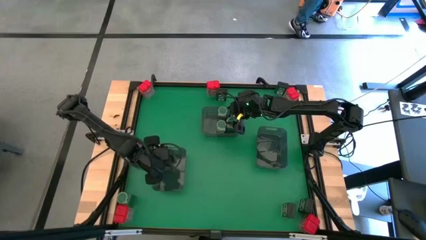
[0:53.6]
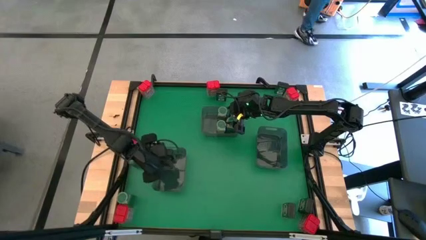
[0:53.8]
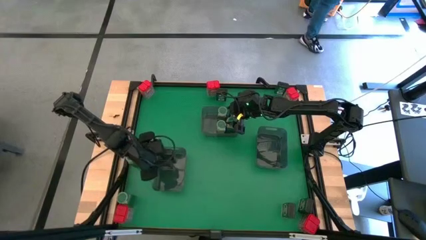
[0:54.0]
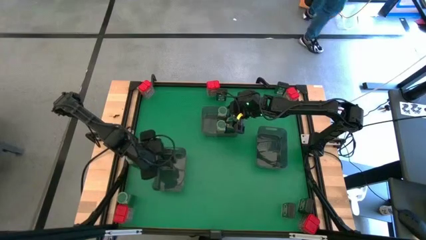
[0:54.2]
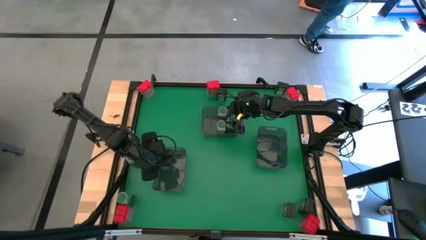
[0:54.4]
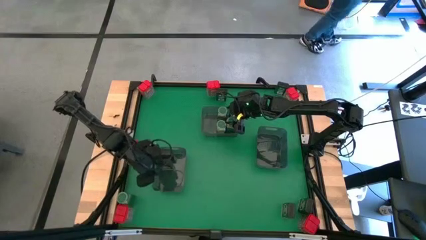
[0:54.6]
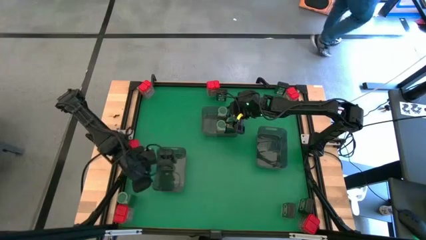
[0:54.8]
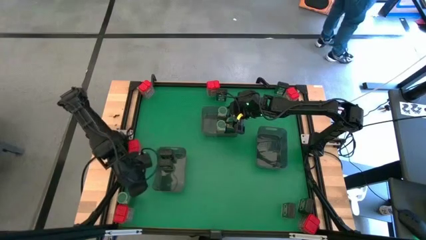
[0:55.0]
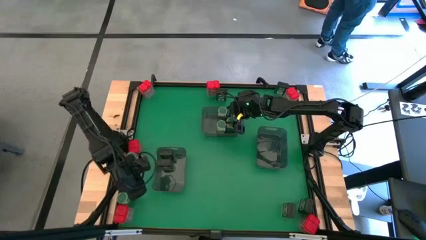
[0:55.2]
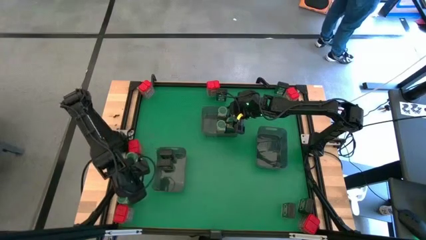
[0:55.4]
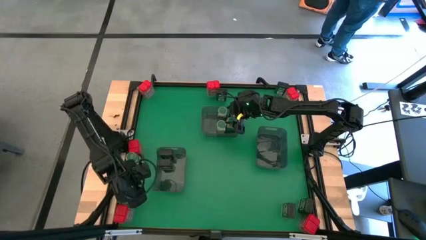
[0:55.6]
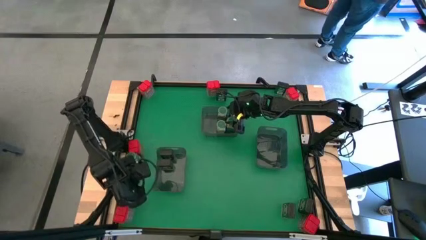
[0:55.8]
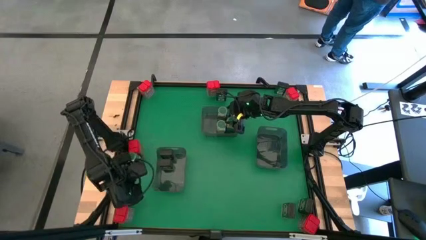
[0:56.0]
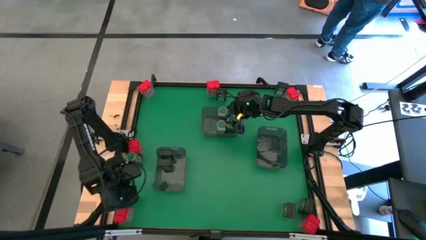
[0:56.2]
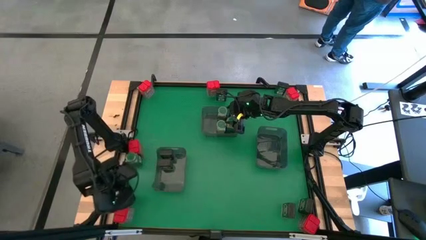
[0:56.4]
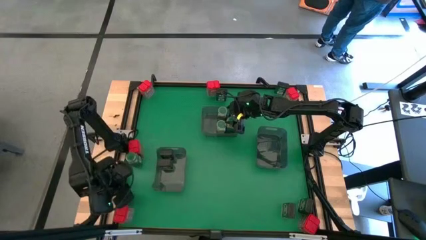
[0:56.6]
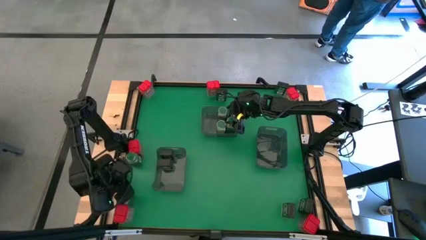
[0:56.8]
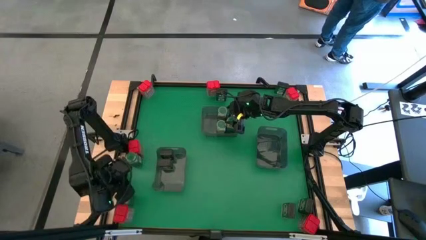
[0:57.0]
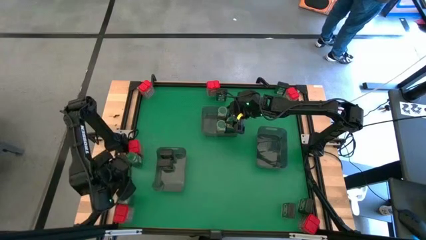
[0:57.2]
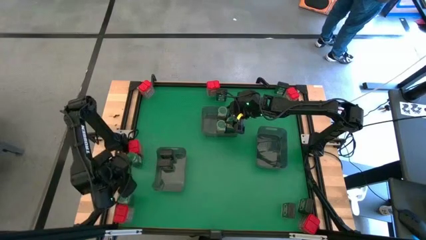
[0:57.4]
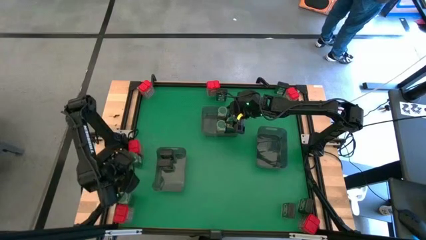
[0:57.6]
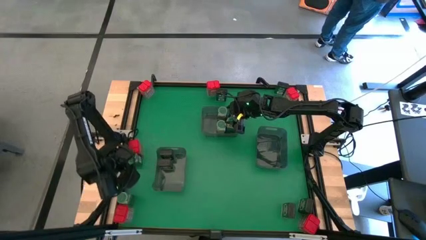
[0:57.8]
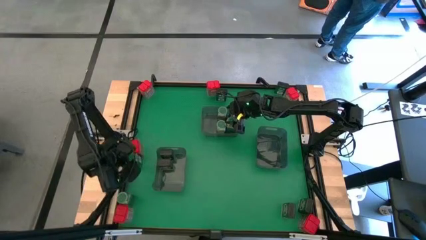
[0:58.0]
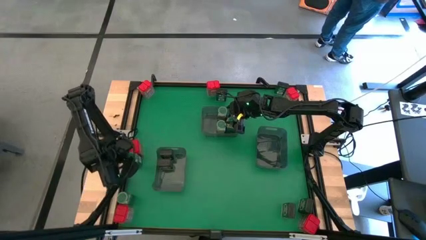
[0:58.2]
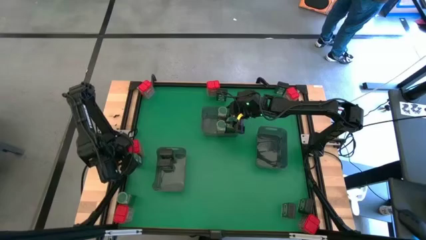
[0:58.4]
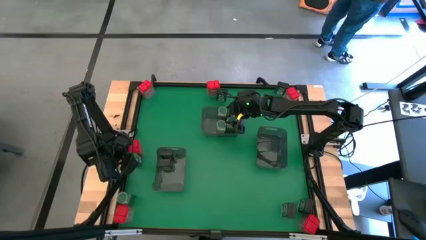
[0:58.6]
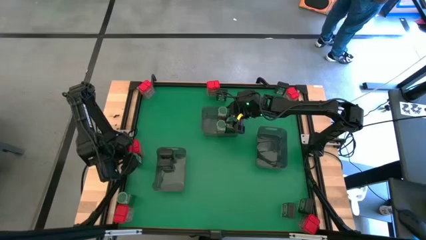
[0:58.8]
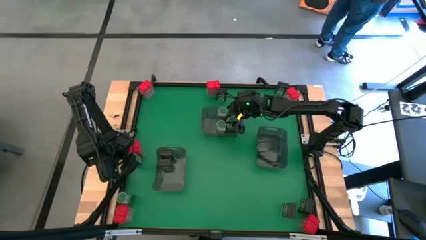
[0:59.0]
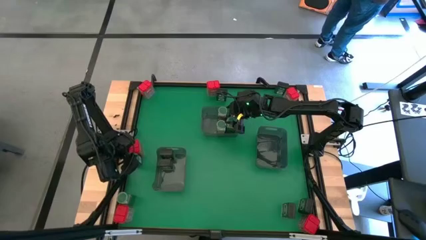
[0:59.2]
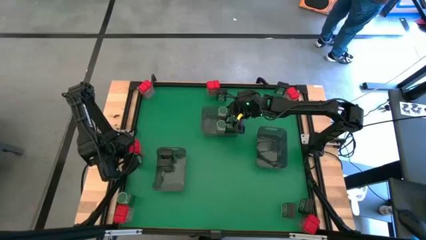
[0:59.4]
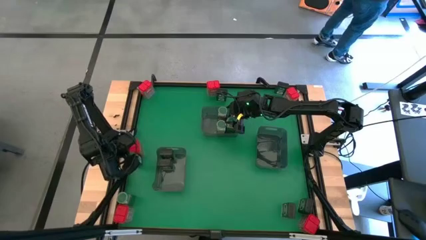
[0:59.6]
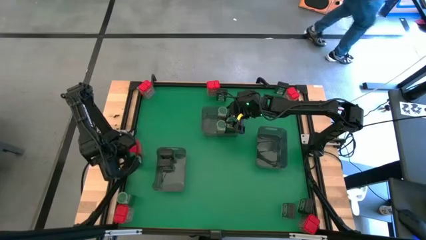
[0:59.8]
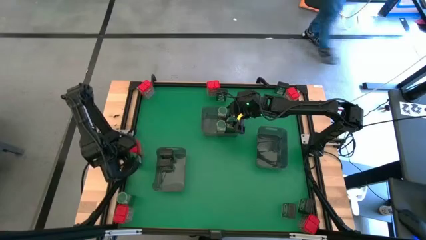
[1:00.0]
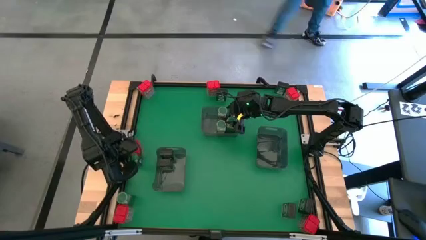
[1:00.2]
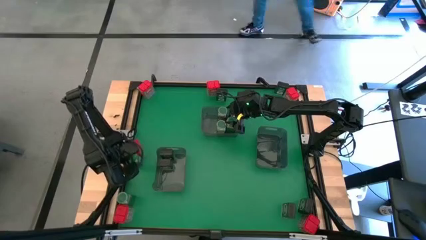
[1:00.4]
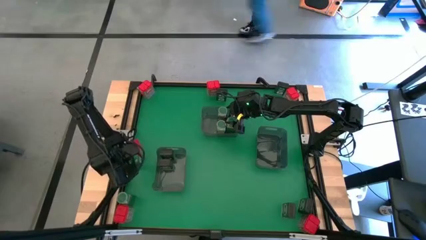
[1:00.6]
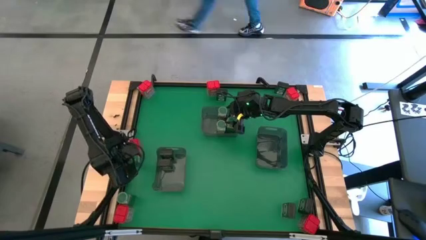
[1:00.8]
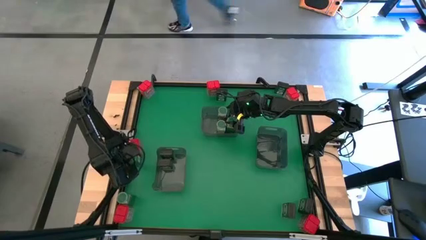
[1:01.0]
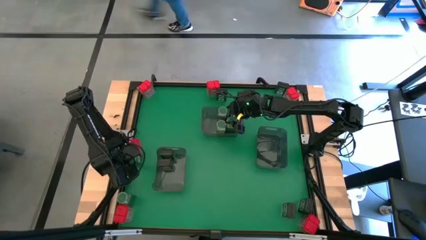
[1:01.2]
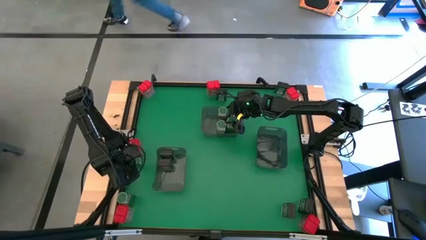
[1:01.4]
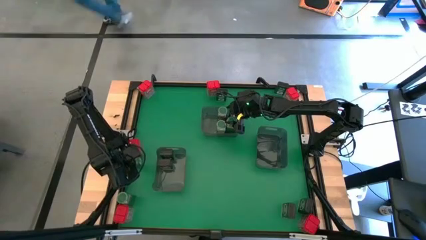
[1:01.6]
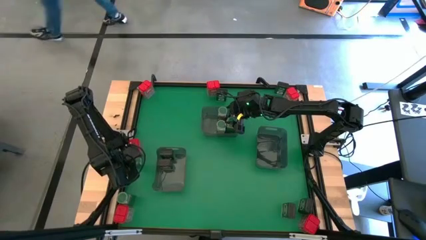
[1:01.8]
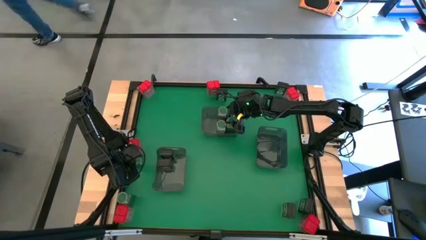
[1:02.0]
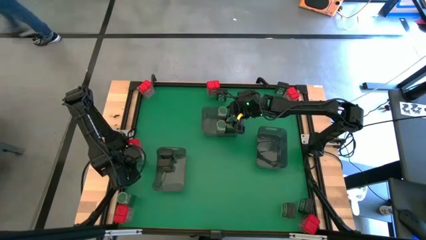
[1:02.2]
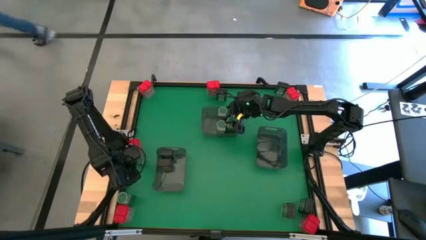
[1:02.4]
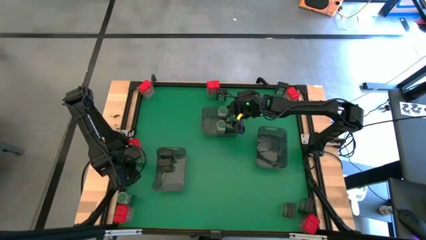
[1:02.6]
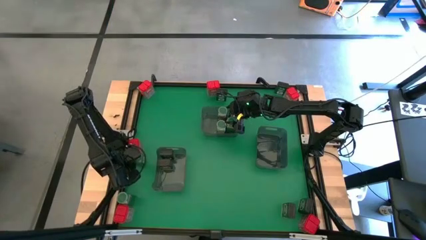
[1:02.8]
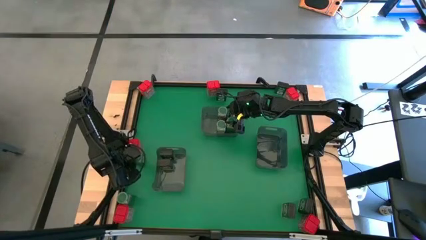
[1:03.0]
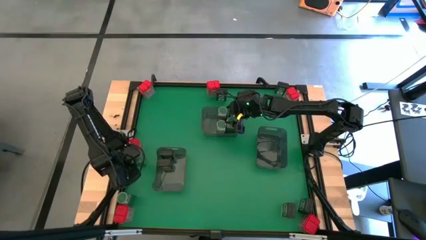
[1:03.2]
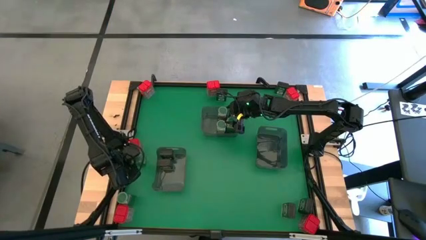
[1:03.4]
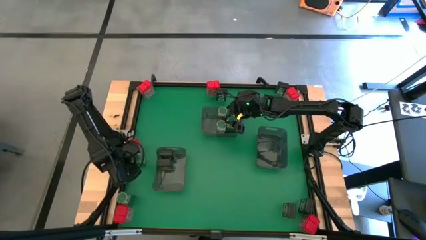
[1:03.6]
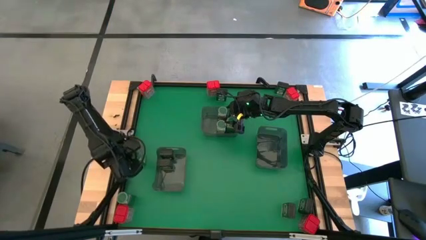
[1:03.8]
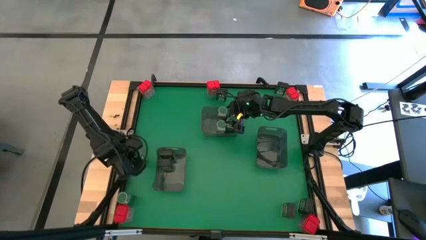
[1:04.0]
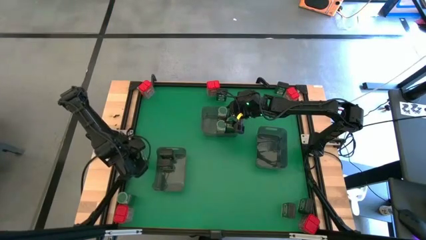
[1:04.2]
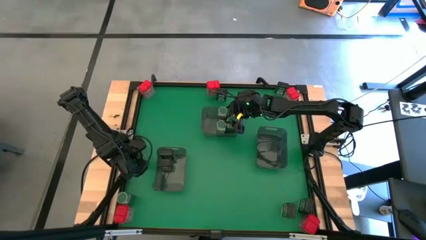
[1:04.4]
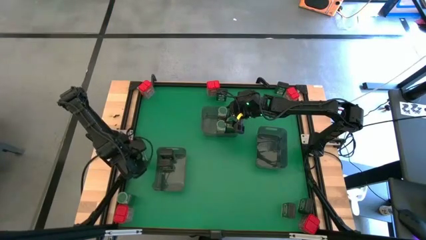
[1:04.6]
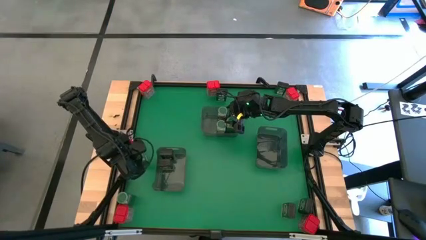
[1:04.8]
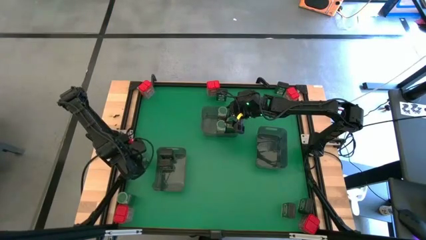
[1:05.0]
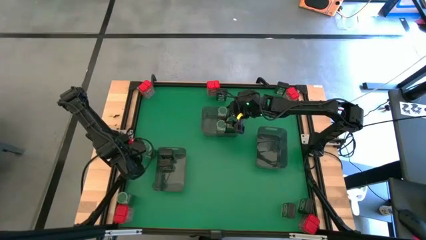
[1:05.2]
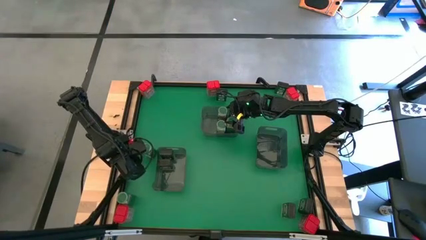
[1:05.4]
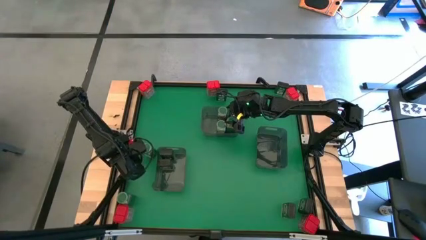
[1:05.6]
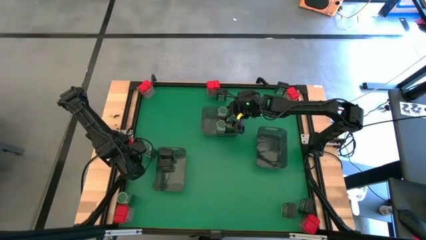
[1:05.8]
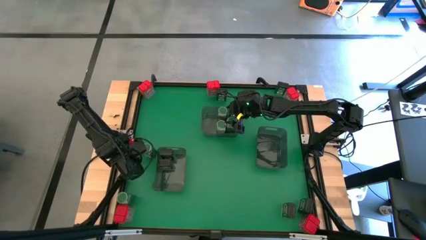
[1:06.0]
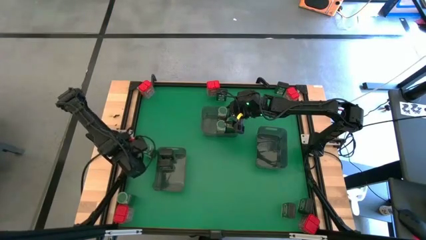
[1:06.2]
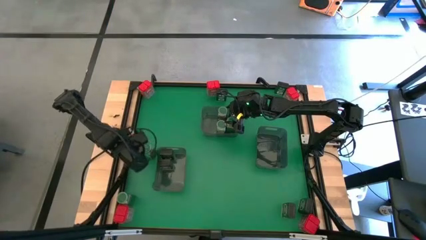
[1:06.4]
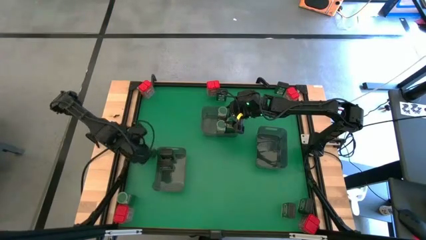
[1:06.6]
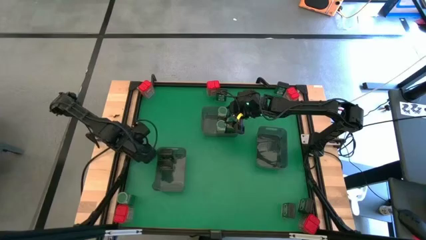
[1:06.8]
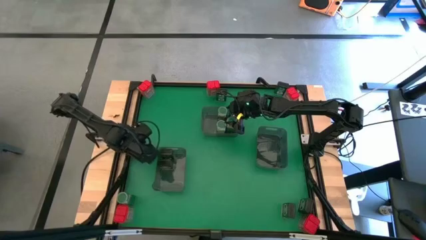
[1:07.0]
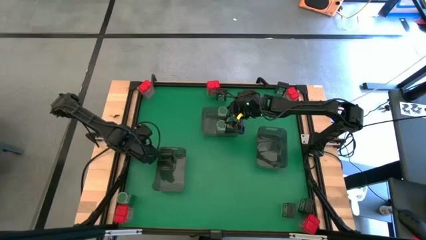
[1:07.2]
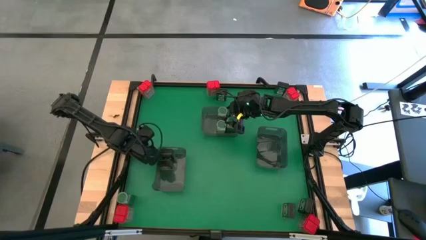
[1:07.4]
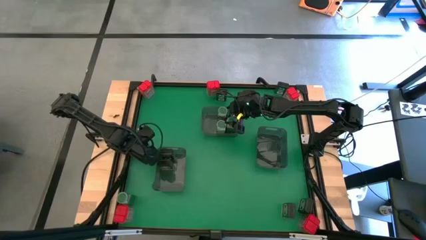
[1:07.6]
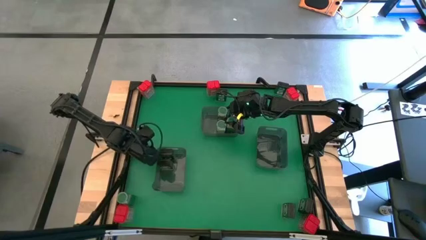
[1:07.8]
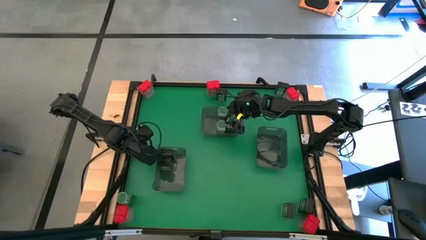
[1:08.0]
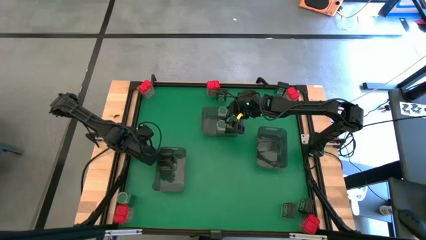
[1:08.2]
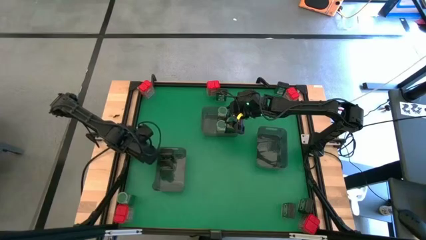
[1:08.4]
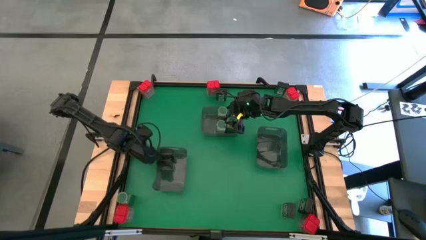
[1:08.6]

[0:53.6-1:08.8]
Task: Sort spices by type
Put the green seasoning bottle into the top black bin

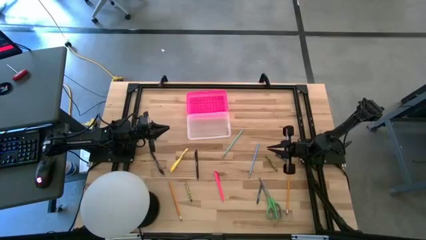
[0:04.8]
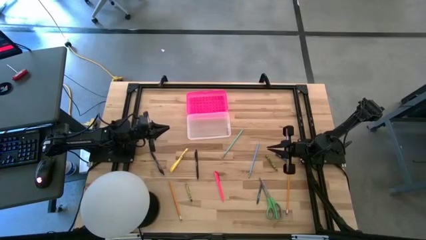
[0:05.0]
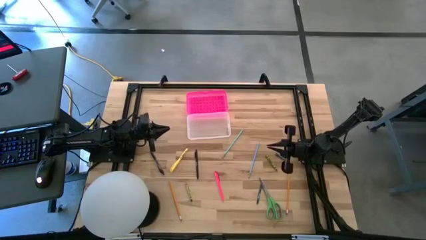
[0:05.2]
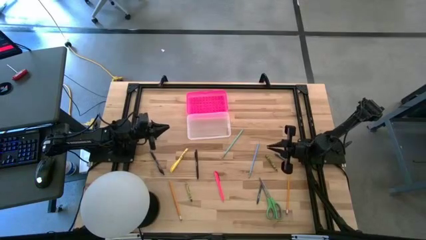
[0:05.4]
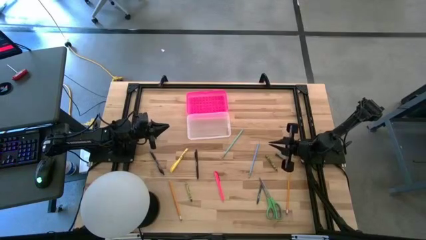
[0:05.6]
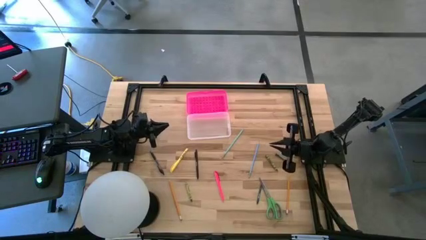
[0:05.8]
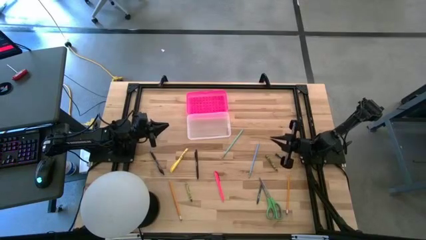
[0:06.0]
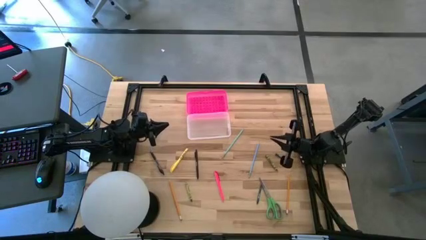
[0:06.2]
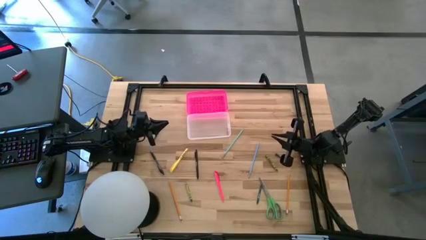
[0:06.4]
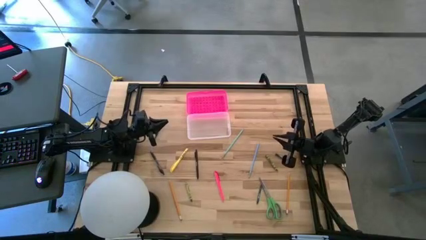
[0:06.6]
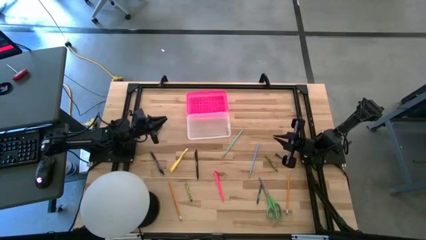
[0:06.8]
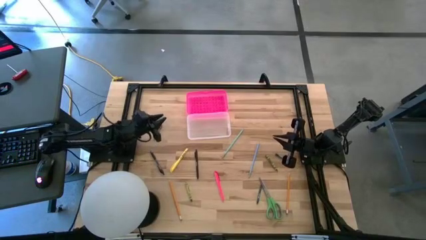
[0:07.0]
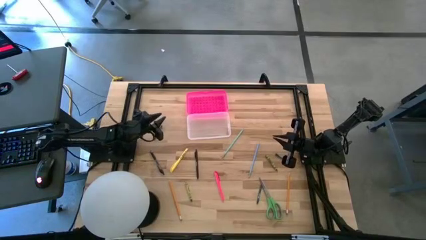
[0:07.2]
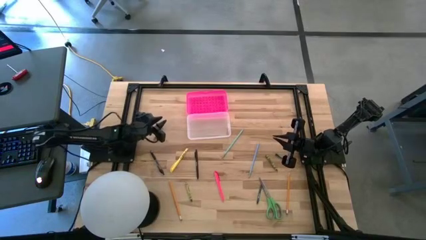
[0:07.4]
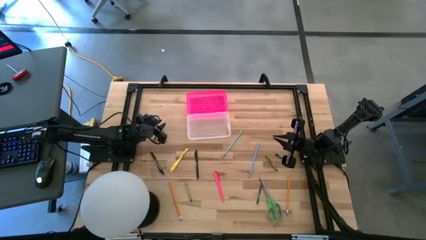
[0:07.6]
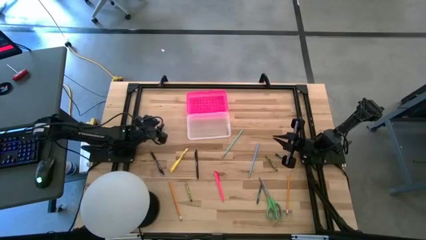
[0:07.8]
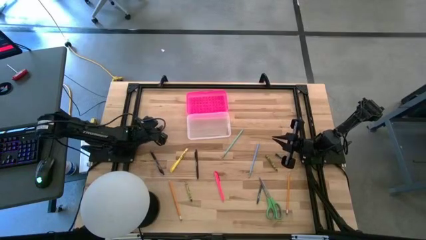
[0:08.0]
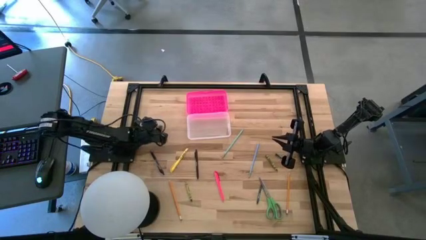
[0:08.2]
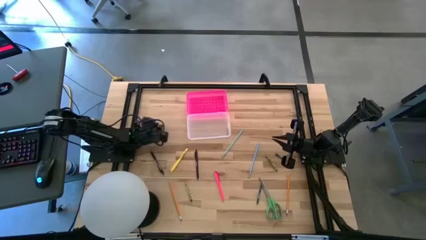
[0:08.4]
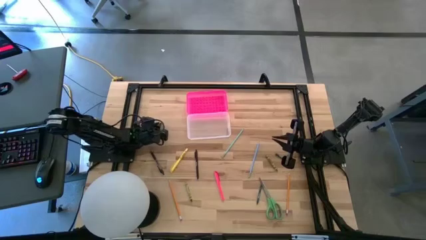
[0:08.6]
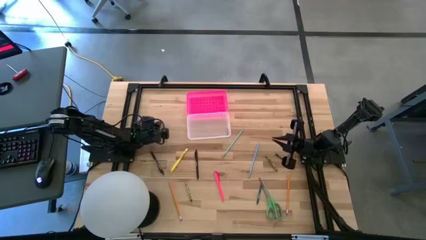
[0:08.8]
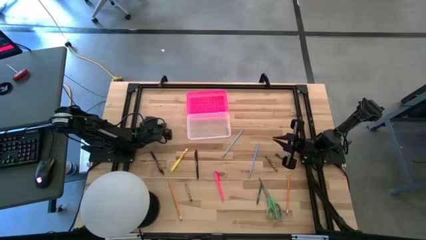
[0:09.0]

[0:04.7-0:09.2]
Task: Pick & place school supplies into a supply box
Put the dark green crayon into the pink supply box
